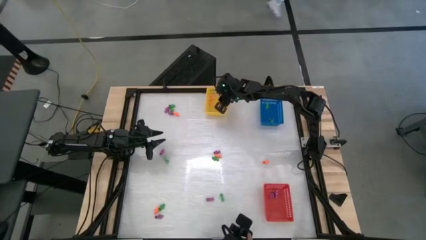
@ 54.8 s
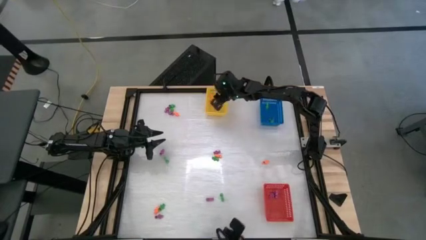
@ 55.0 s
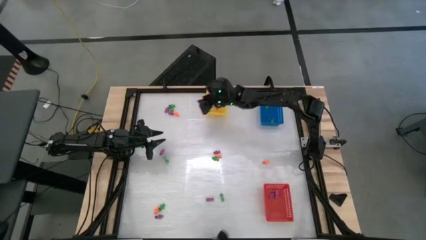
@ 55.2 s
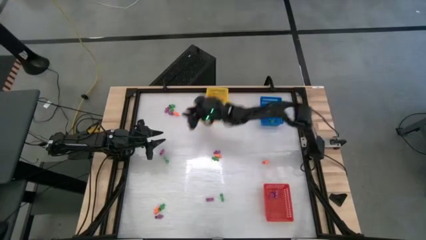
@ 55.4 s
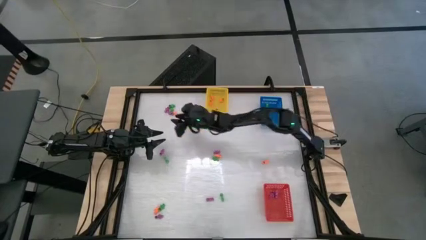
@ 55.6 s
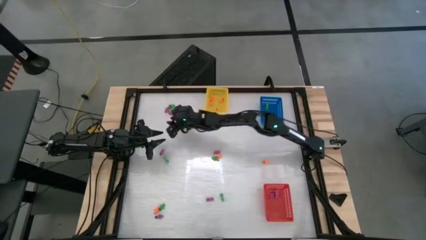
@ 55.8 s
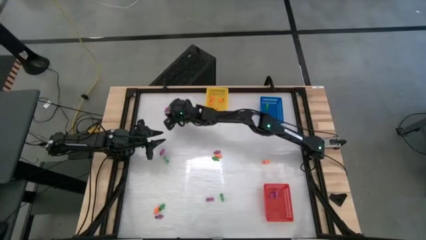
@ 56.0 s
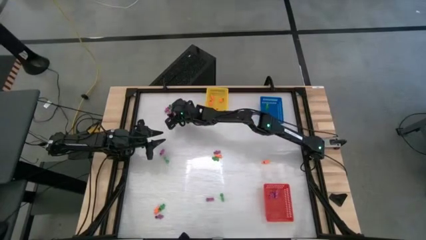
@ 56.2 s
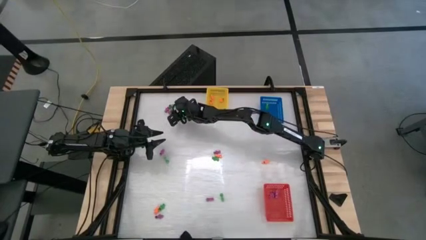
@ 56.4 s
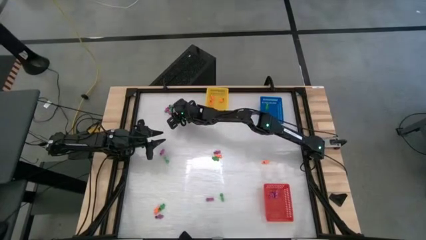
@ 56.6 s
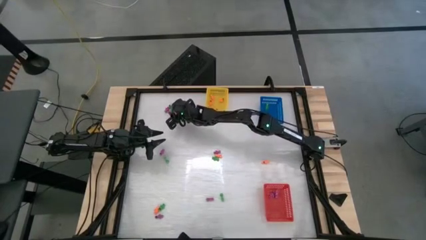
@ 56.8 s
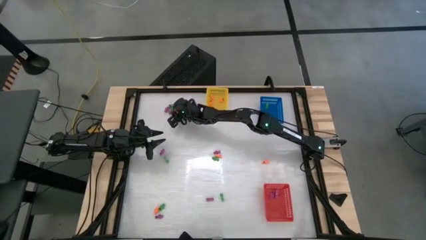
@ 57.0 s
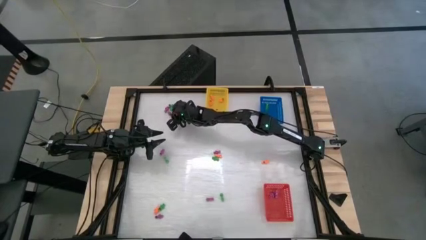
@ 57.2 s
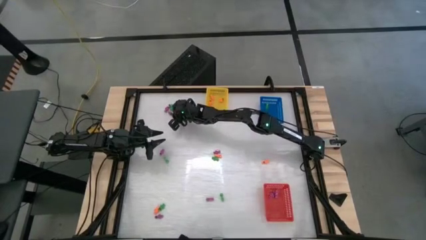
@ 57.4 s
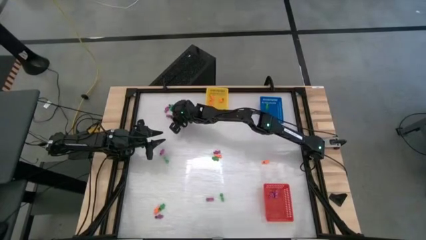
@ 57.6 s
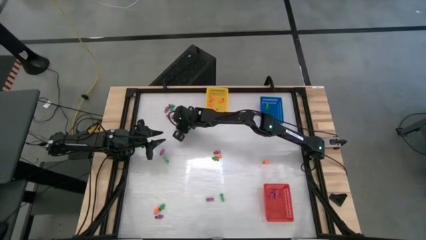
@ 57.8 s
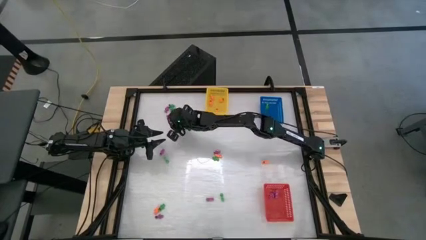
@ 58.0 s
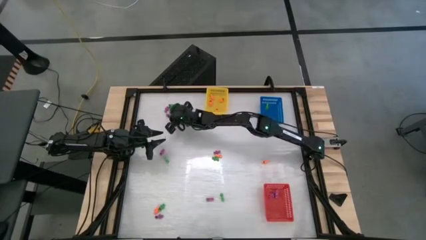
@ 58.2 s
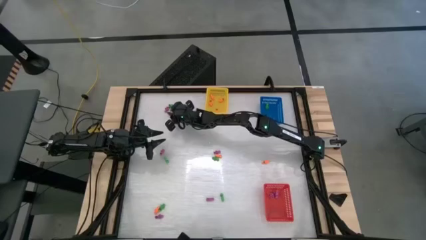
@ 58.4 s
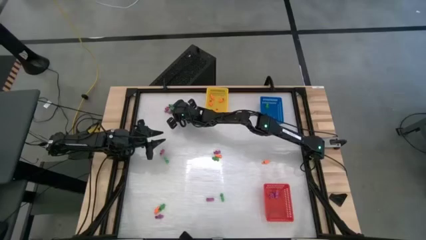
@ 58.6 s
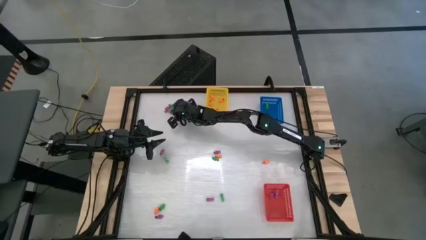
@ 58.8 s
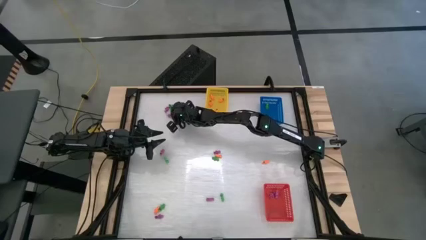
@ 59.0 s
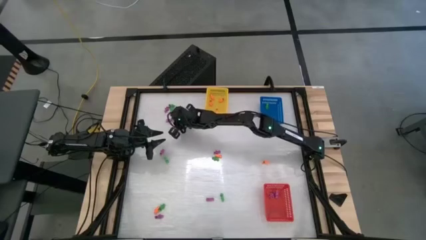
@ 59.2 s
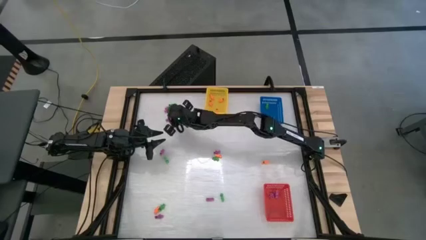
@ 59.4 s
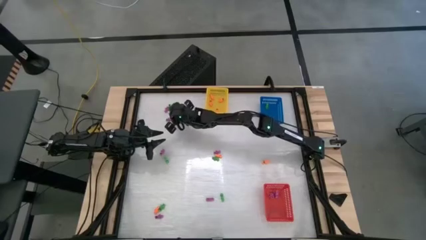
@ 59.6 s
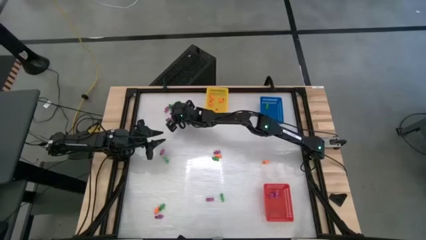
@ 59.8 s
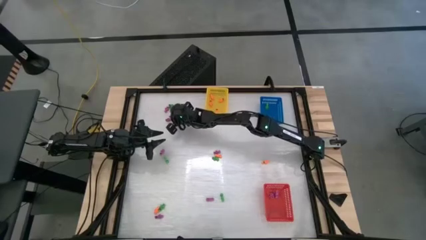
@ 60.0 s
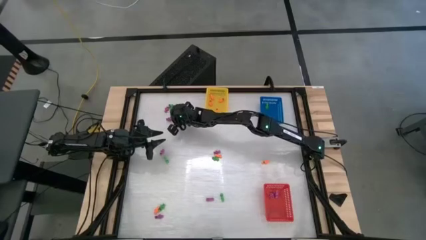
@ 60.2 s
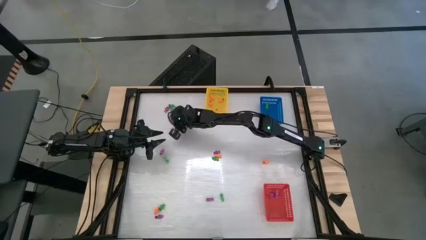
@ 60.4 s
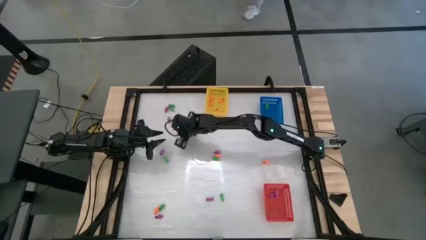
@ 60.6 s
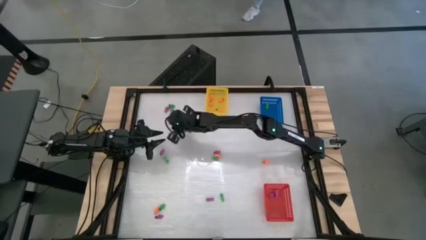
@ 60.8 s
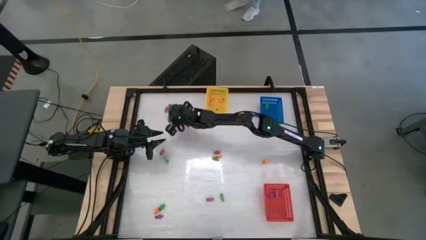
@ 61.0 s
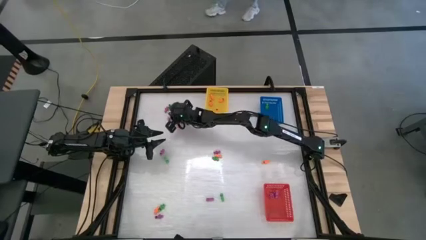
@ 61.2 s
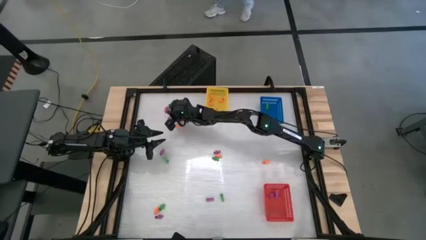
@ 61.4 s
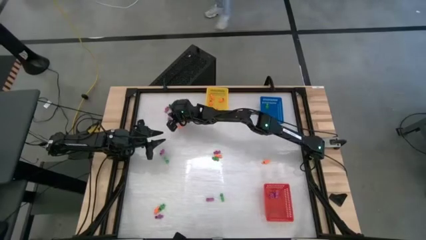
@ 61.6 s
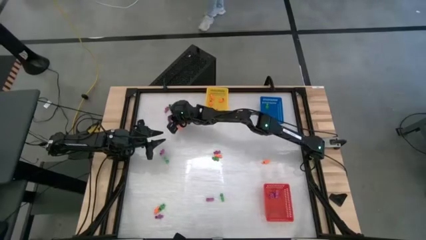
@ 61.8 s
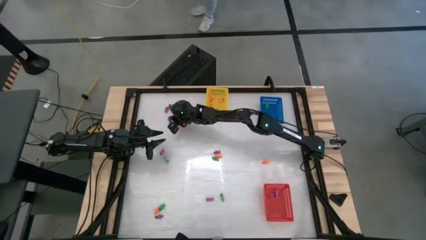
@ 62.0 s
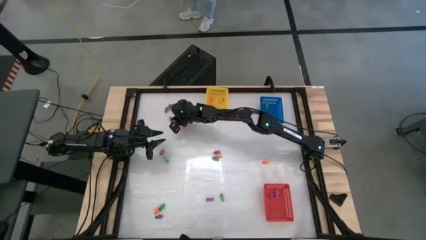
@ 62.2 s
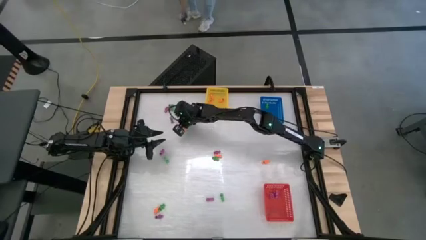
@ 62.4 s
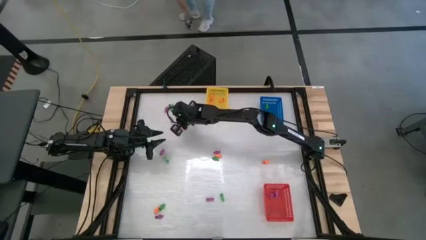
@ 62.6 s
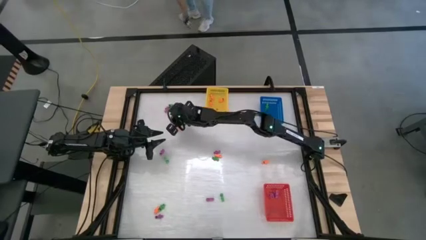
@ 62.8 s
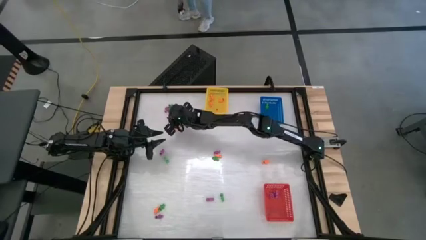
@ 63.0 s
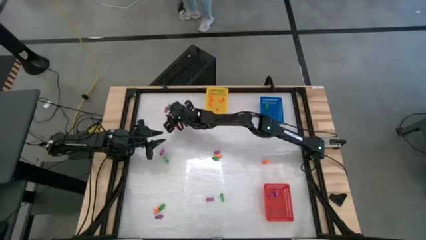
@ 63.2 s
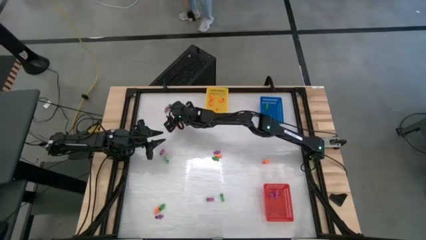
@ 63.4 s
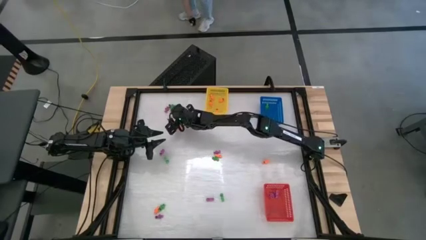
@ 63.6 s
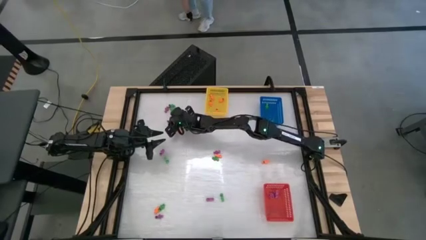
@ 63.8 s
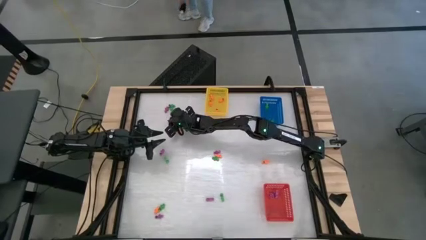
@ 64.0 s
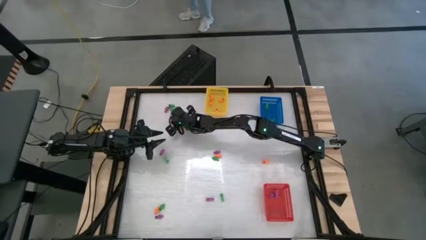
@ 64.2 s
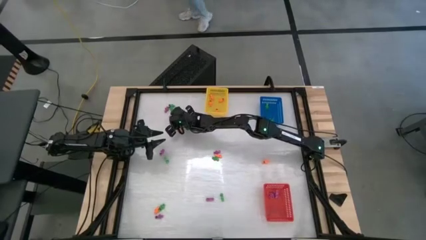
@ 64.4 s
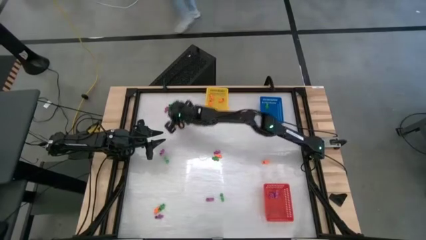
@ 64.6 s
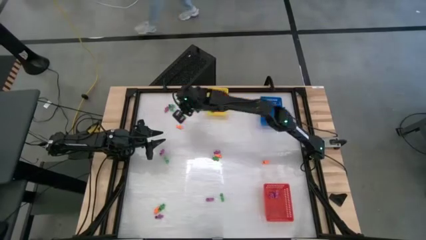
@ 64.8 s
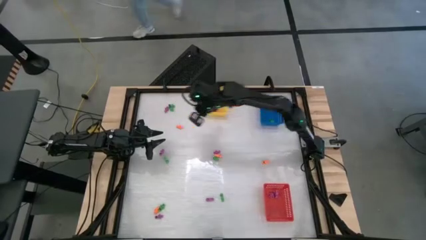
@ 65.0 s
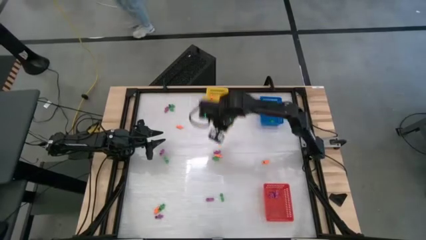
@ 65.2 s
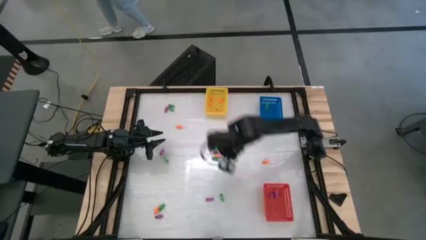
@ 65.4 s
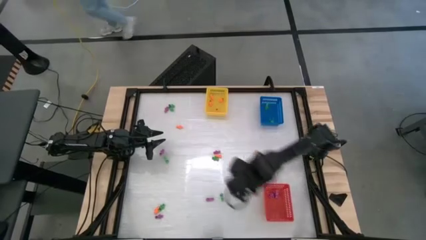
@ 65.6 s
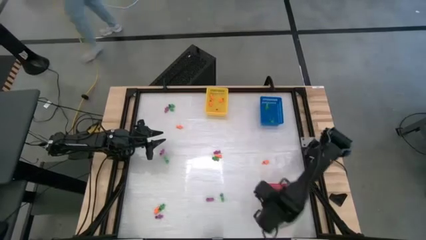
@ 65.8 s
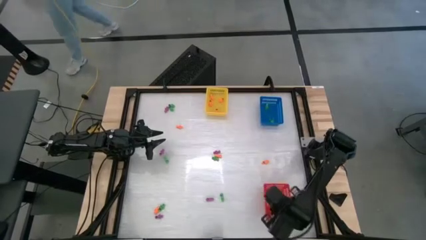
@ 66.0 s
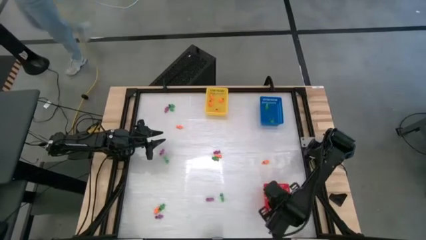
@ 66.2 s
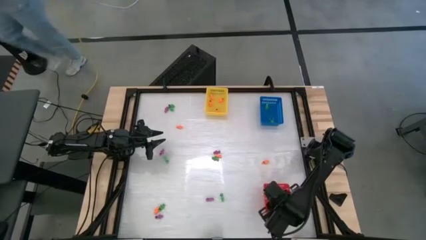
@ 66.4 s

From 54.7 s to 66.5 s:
Task: Sort Halloween decoration
Put the violet skeleton toy into the red bin

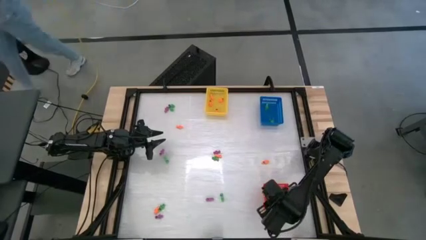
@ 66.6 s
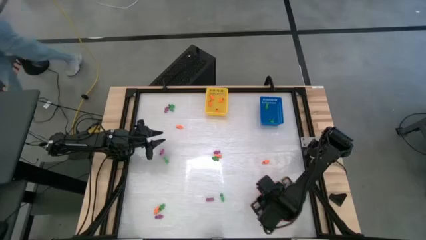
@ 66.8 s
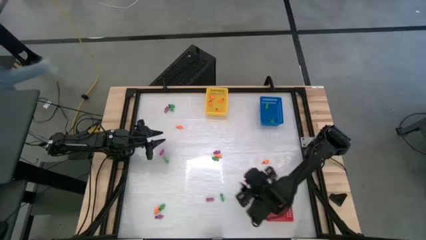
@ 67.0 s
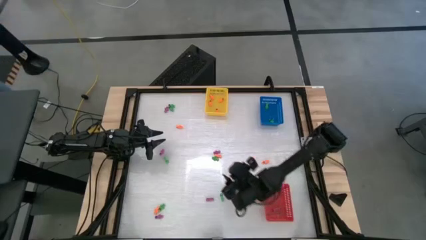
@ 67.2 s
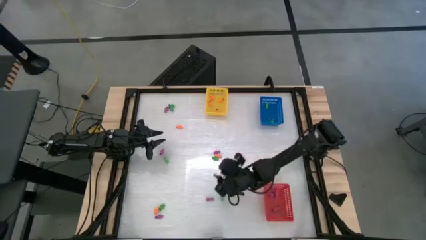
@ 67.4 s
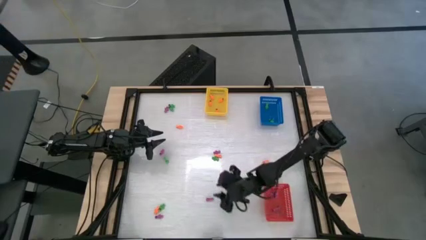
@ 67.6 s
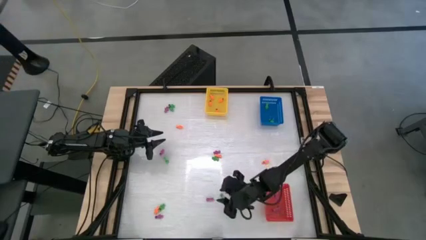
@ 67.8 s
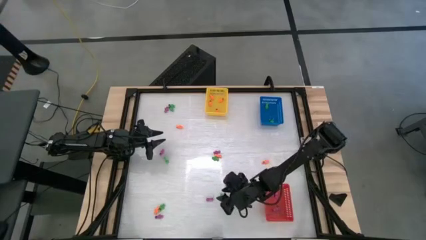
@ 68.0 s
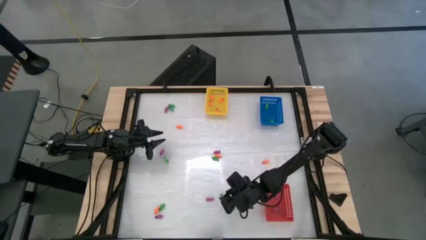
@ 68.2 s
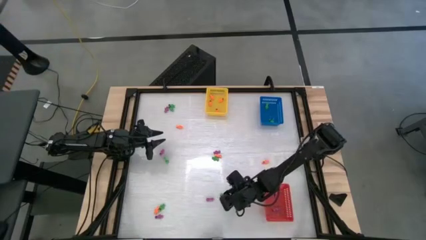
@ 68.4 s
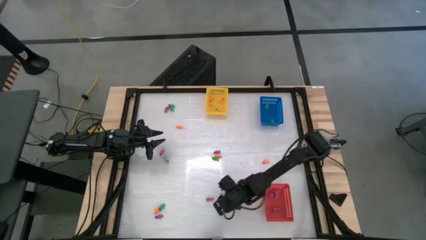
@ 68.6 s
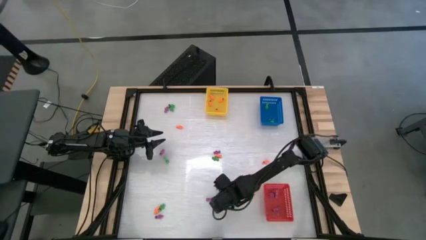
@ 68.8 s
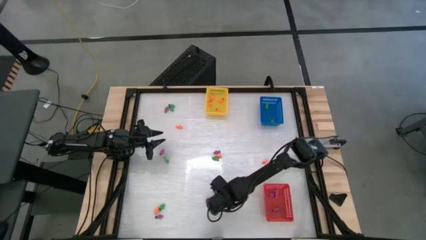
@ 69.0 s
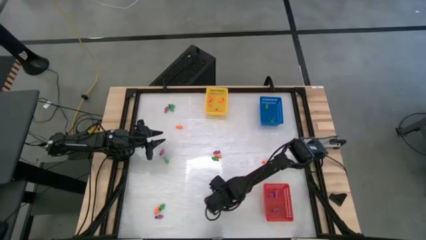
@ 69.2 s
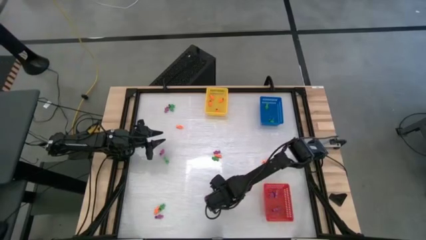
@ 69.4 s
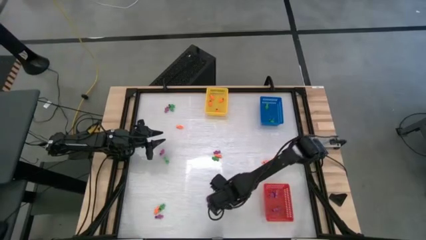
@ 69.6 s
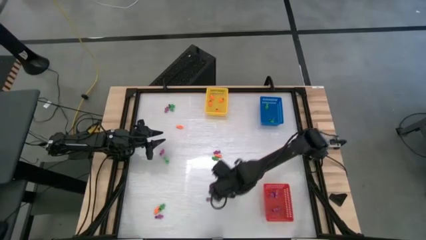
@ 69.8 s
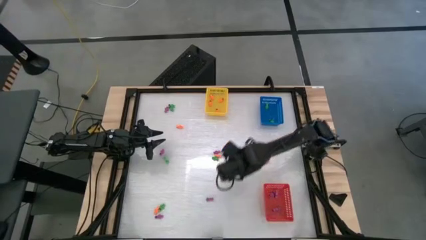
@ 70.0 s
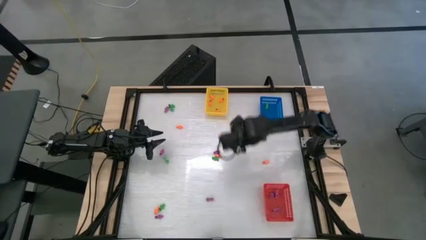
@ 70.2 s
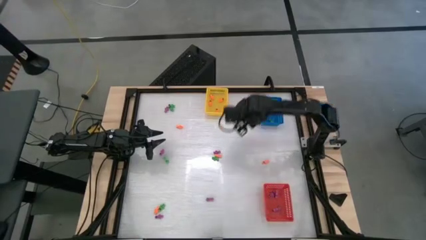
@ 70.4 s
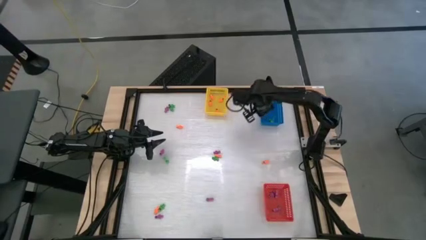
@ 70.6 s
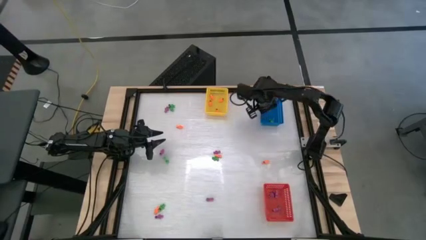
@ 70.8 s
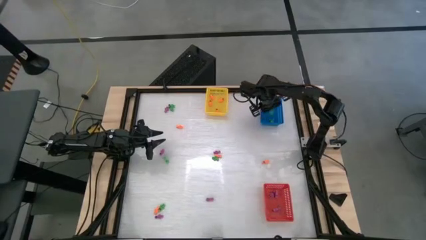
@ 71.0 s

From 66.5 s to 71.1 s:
Put the green skeleton toy into the blue bin
